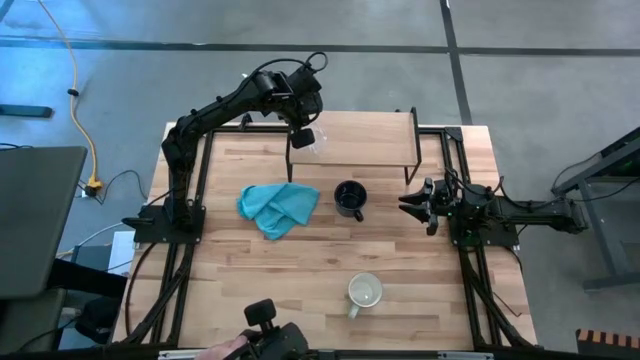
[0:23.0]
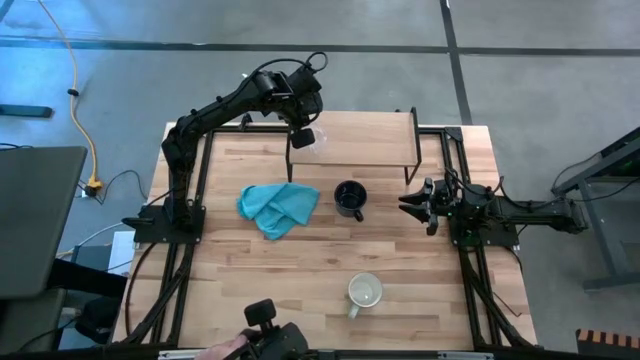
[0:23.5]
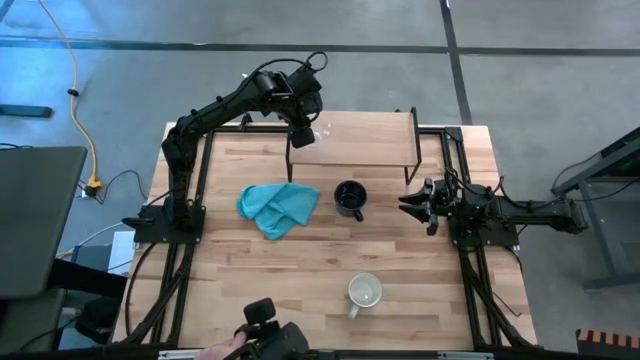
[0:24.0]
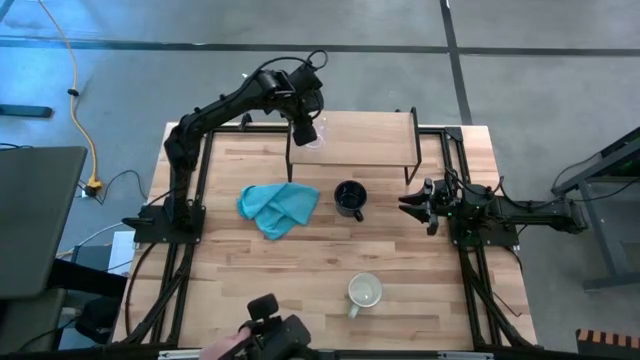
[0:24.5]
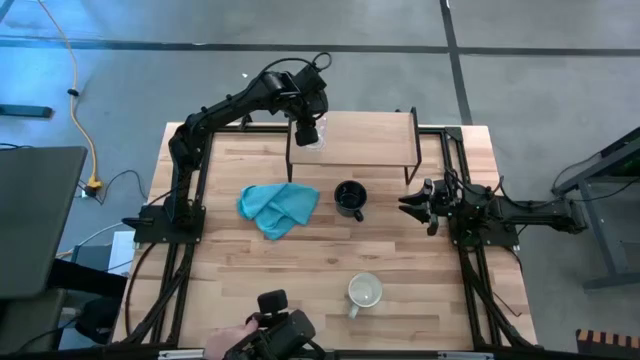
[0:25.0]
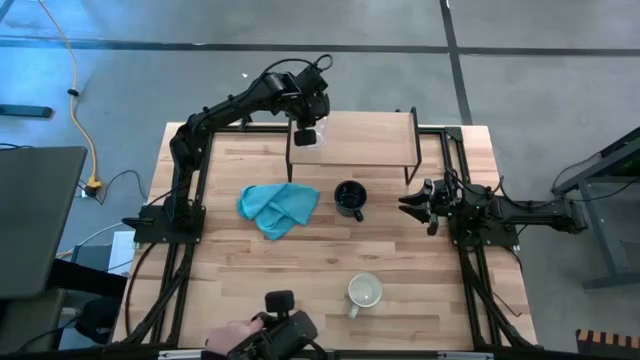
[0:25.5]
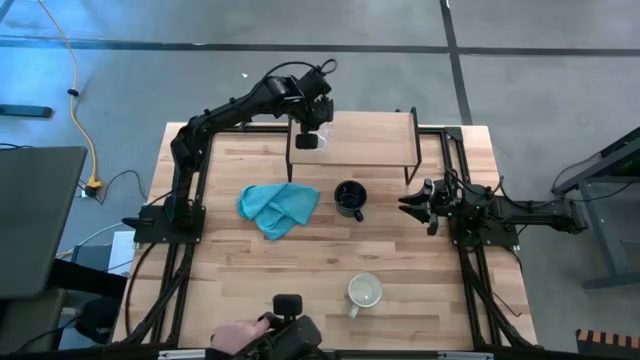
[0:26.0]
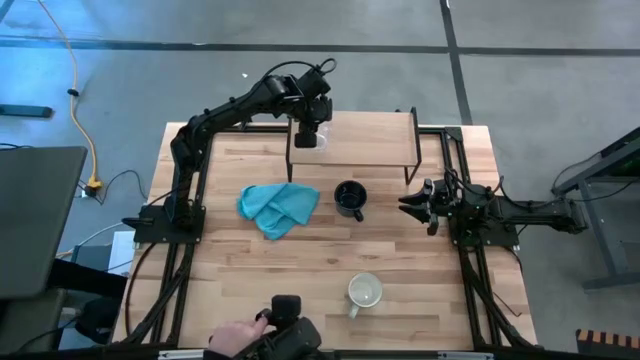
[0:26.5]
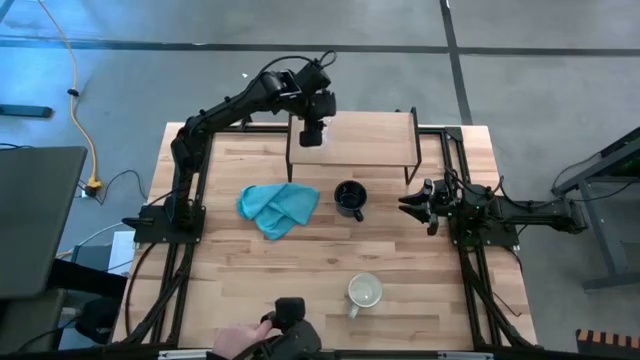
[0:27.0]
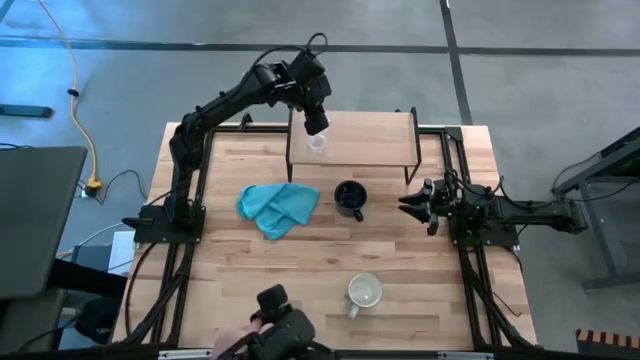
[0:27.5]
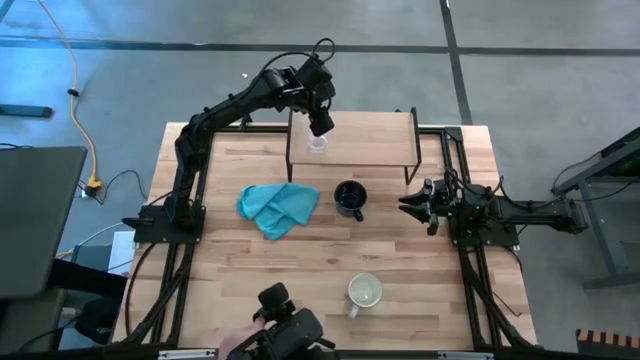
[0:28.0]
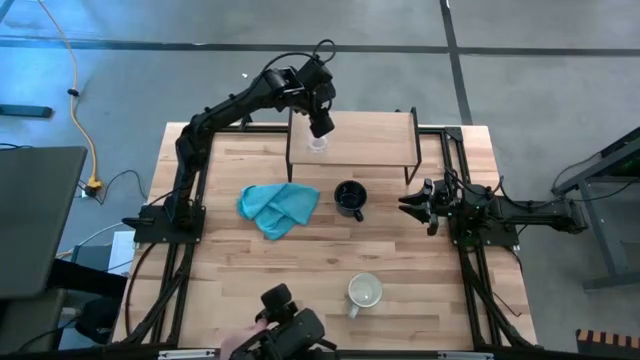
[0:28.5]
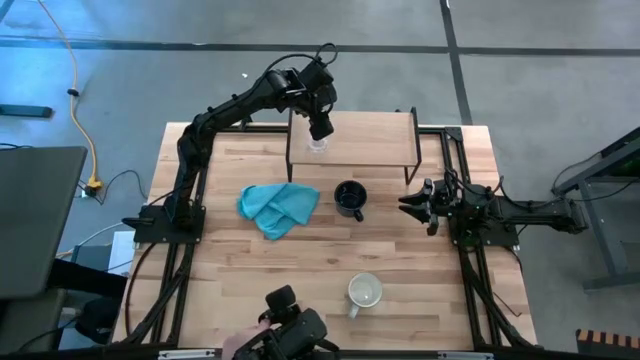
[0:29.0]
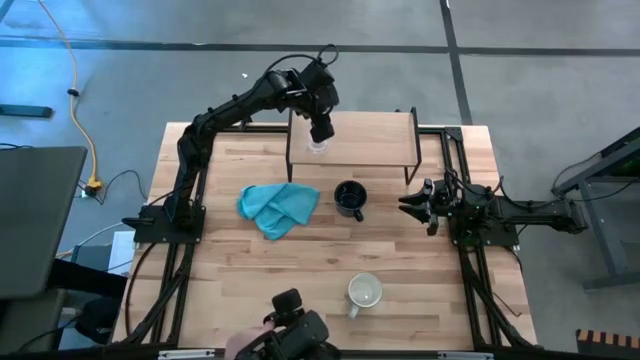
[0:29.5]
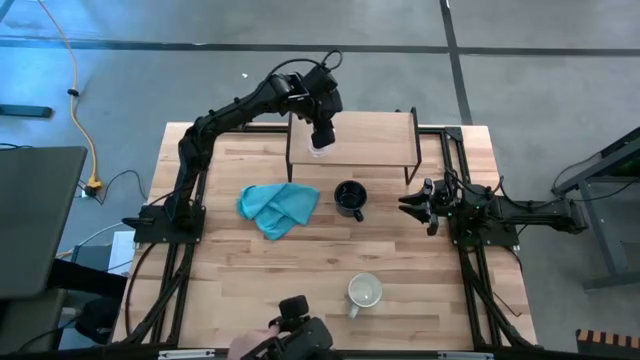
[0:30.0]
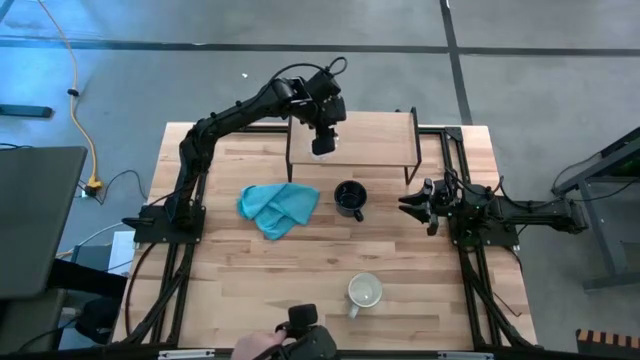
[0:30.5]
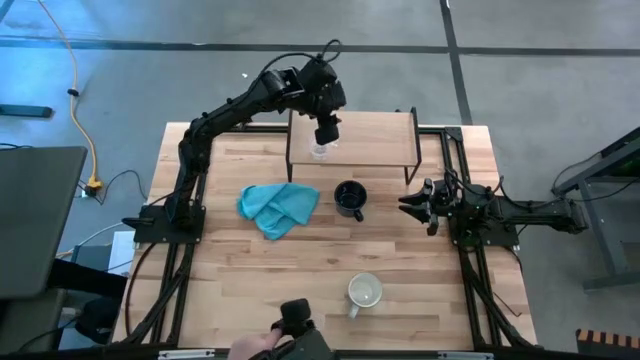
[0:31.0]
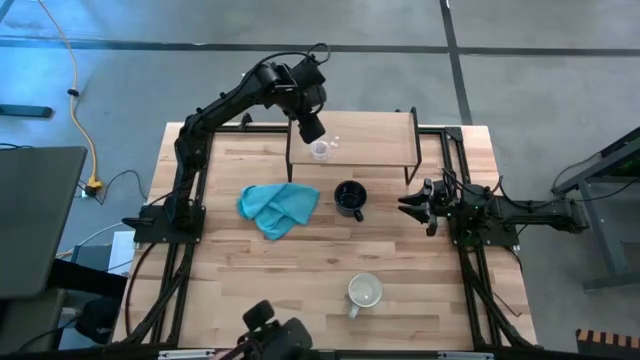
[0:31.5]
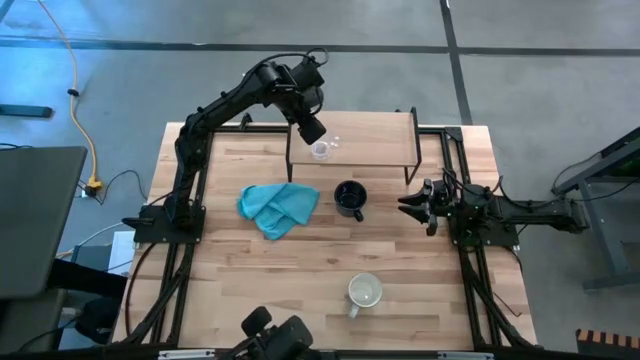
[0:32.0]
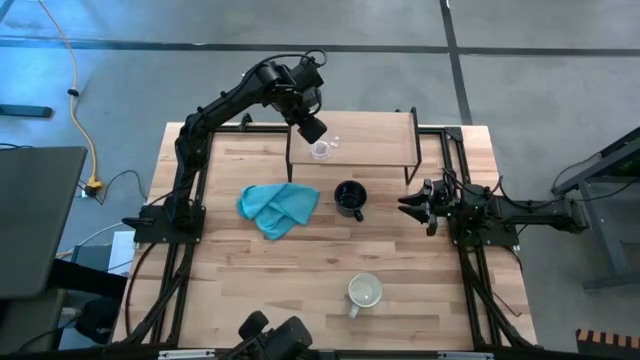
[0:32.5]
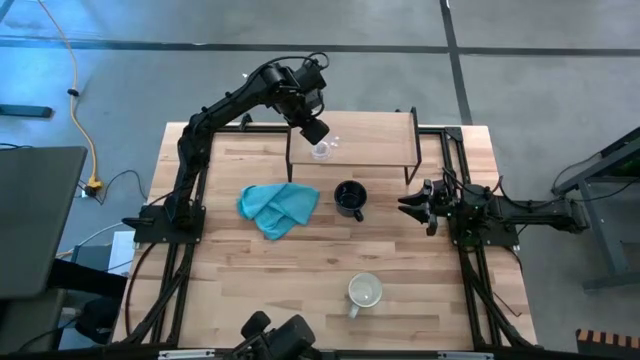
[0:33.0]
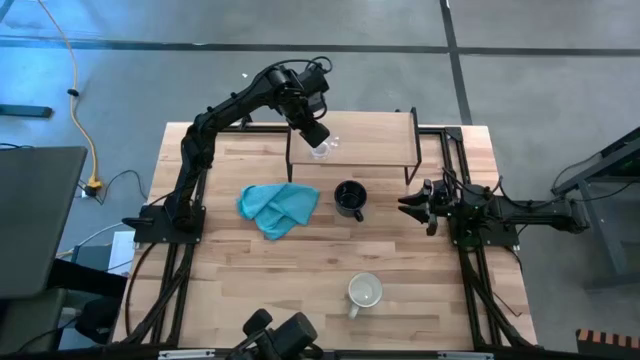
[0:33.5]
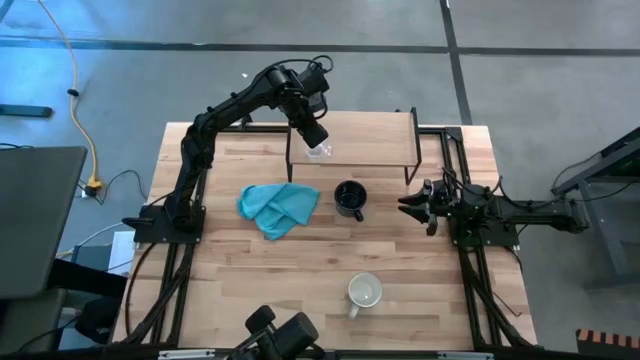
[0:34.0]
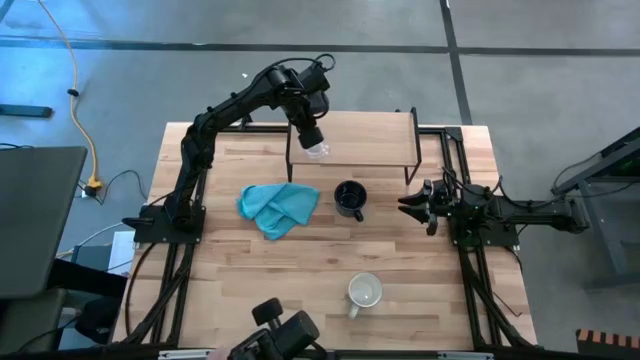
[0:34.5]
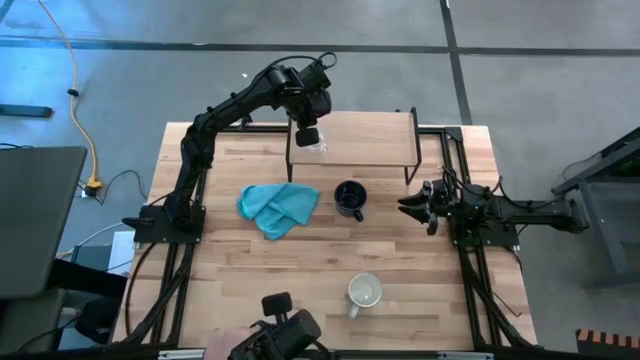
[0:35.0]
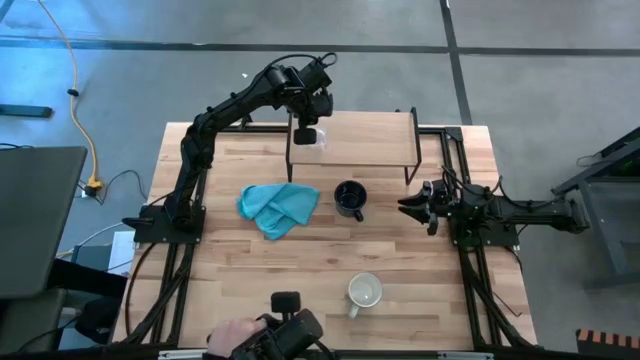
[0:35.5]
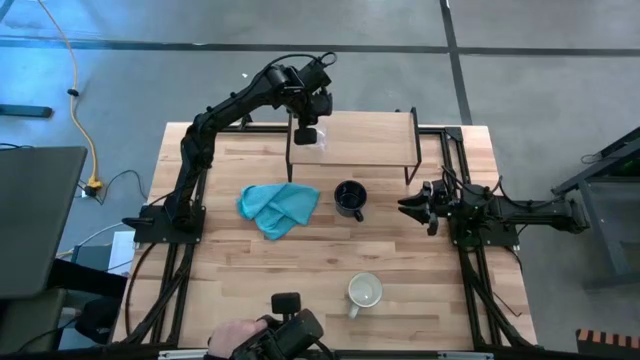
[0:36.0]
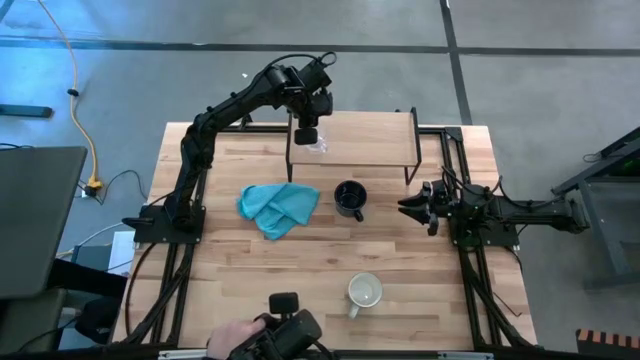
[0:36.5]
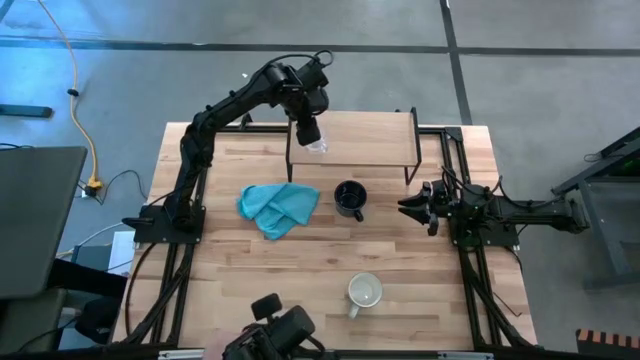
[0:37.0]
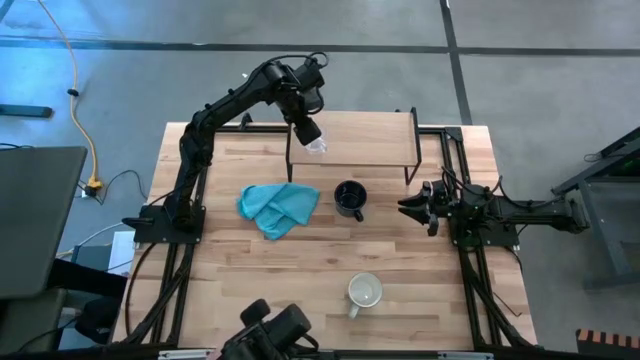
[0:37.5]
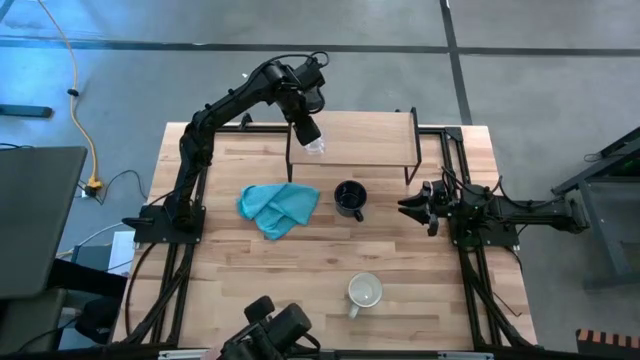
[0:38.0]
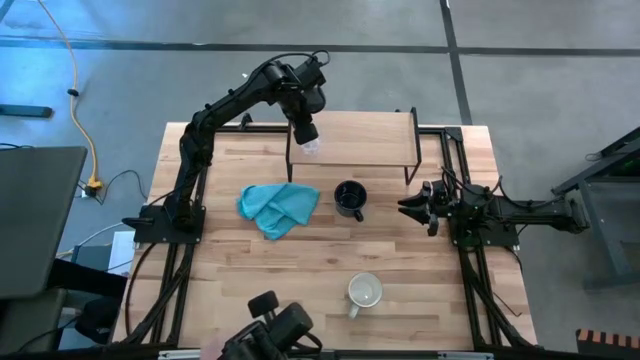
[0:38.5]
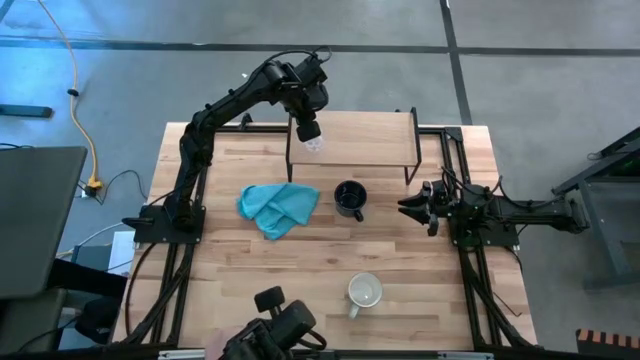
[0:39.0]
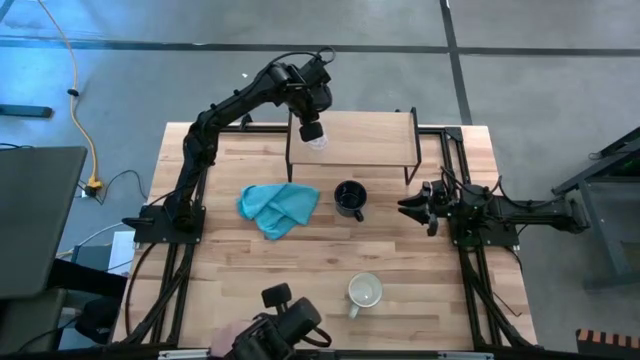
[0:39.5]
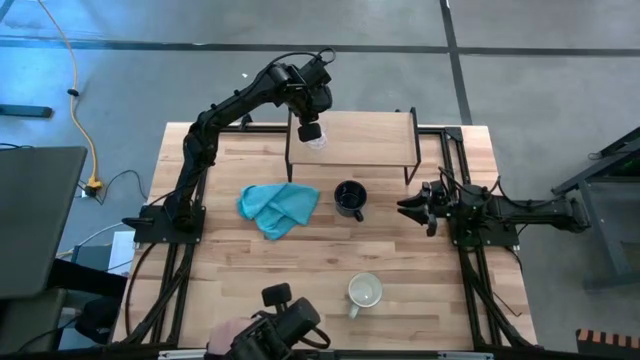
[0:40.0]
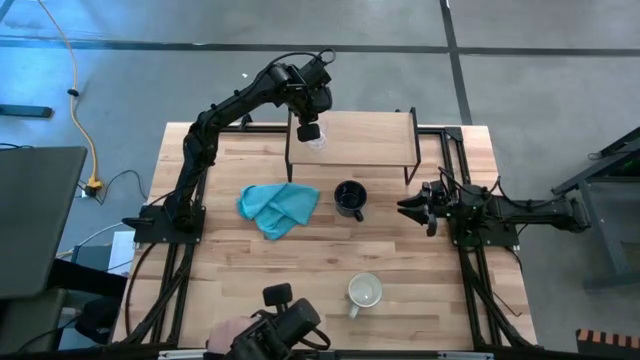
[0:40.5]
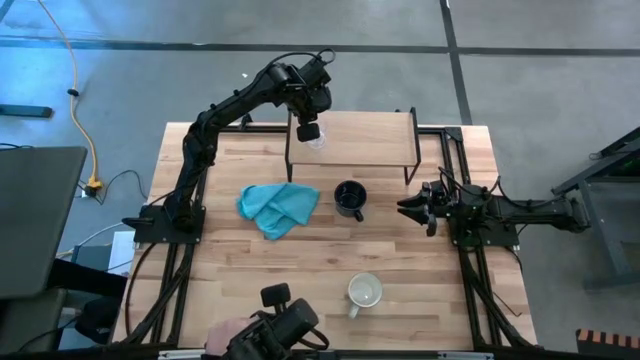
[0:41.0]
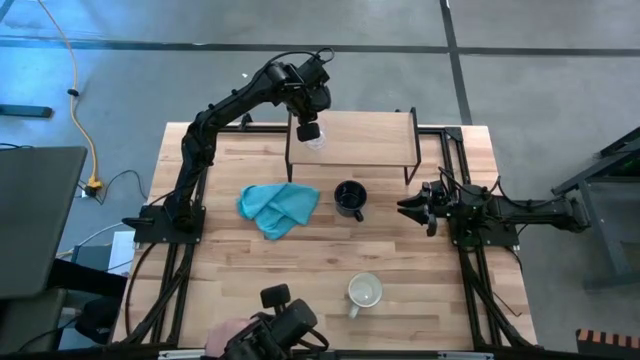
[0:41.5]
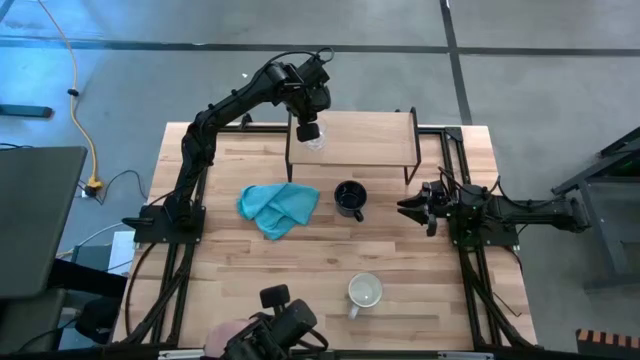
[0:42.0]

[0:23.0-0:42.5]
Task: Stack small to large cups/mugs on shelf
Put the transparent mug on the shelf
